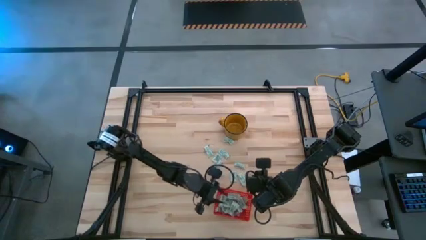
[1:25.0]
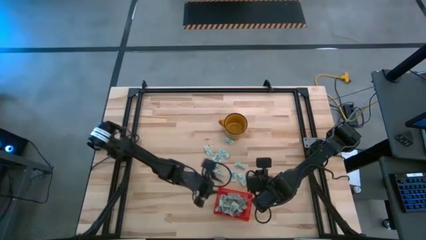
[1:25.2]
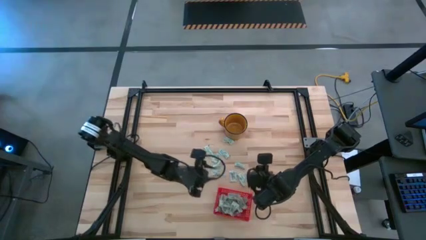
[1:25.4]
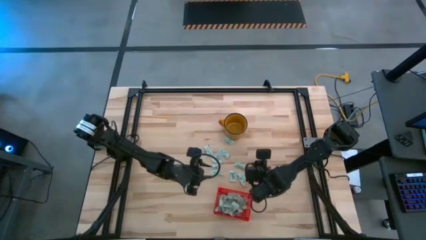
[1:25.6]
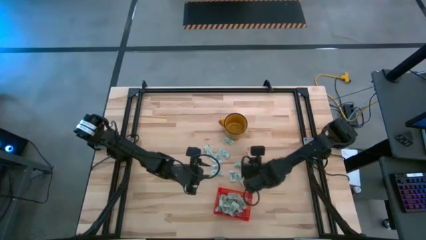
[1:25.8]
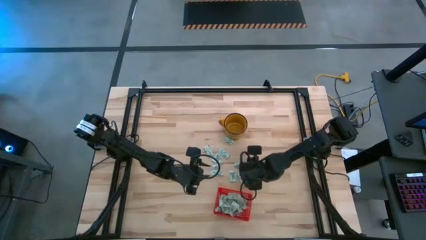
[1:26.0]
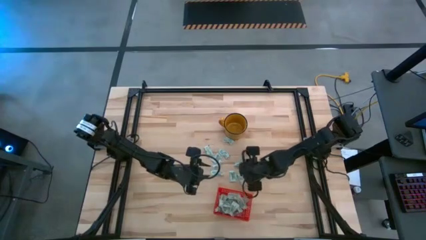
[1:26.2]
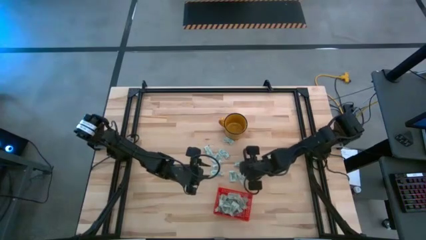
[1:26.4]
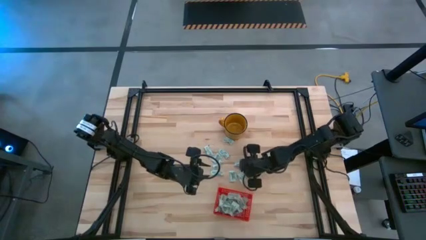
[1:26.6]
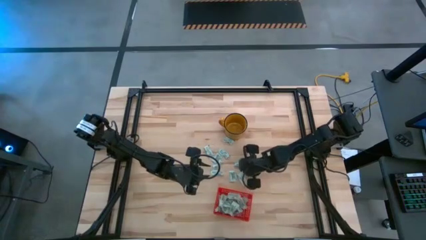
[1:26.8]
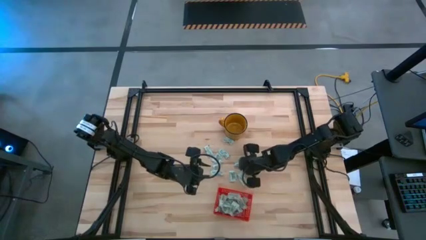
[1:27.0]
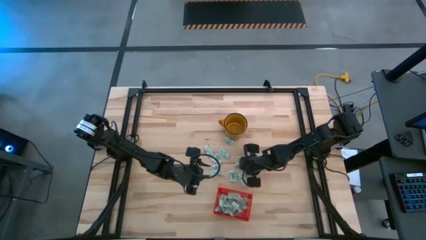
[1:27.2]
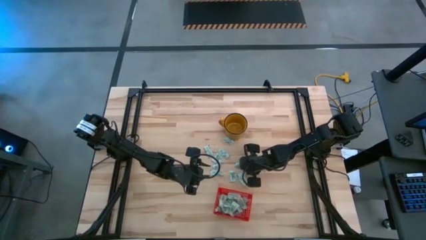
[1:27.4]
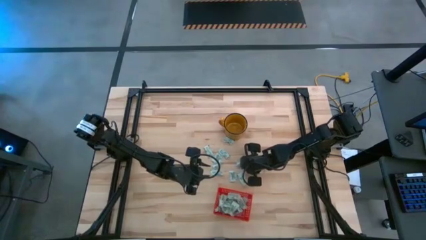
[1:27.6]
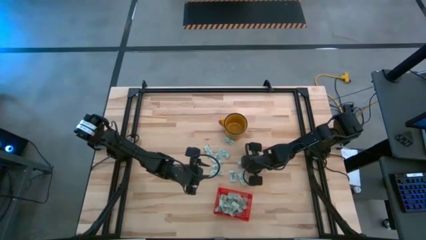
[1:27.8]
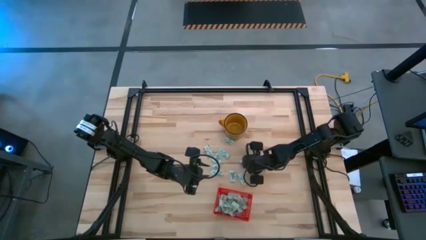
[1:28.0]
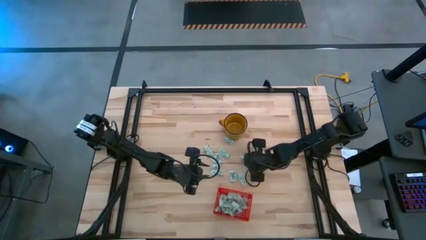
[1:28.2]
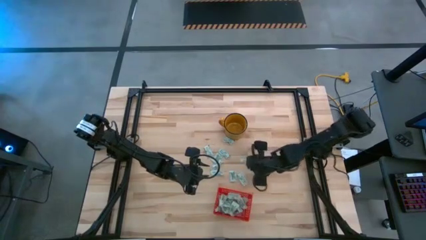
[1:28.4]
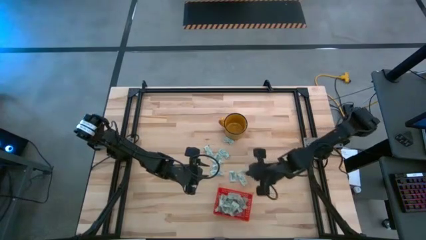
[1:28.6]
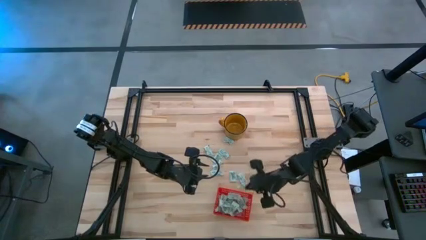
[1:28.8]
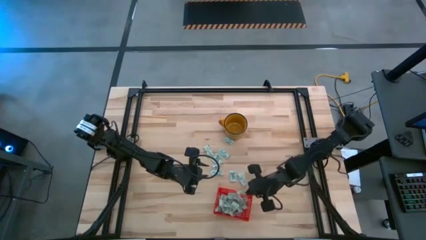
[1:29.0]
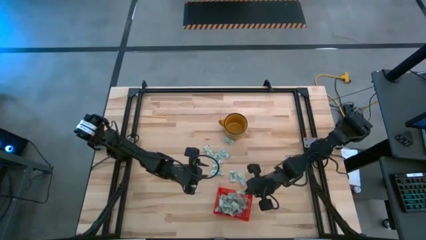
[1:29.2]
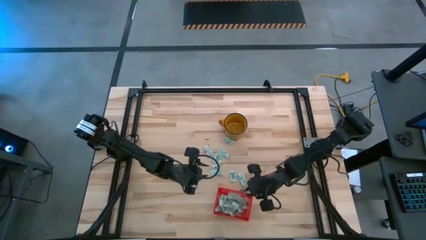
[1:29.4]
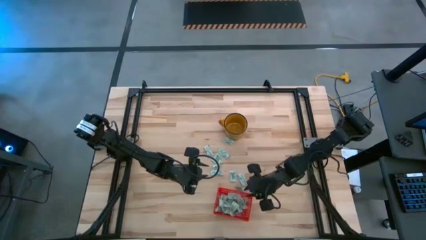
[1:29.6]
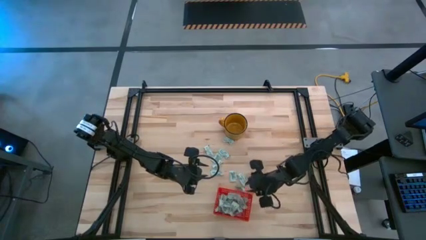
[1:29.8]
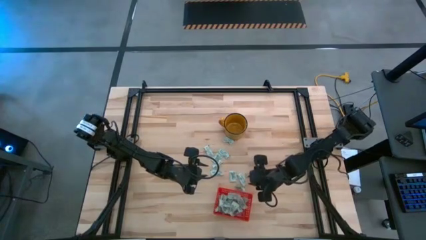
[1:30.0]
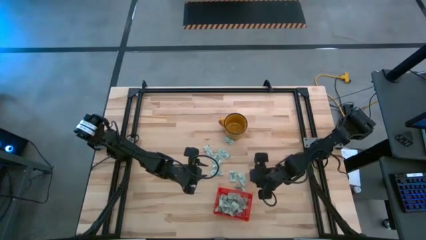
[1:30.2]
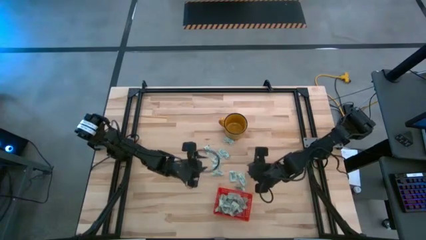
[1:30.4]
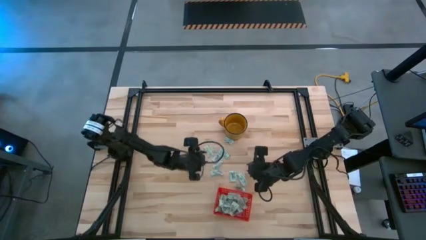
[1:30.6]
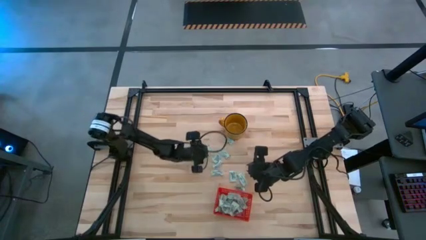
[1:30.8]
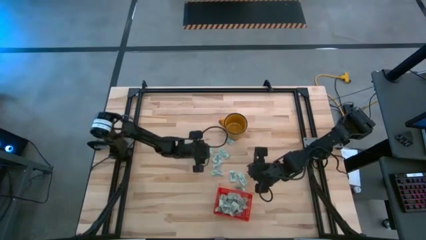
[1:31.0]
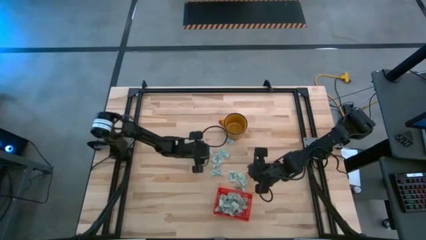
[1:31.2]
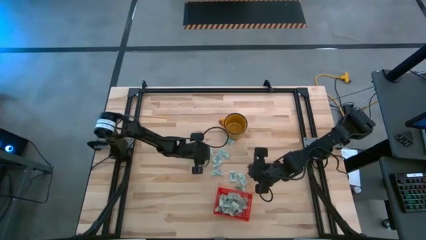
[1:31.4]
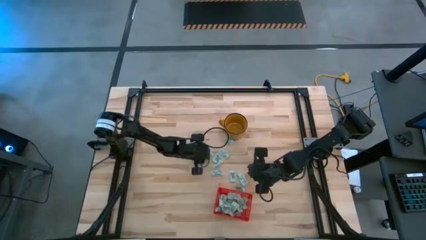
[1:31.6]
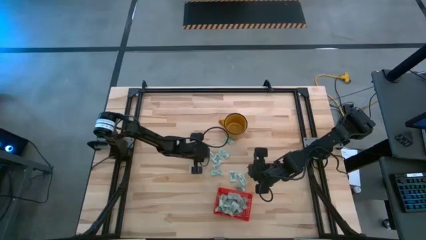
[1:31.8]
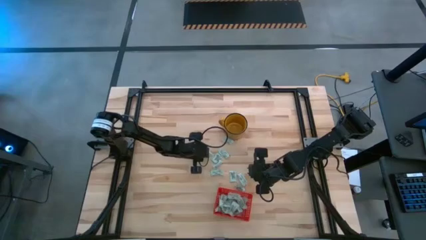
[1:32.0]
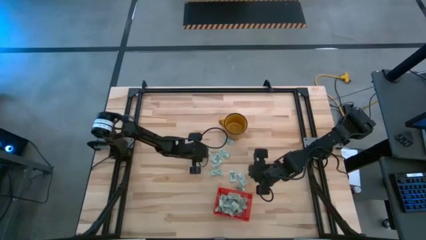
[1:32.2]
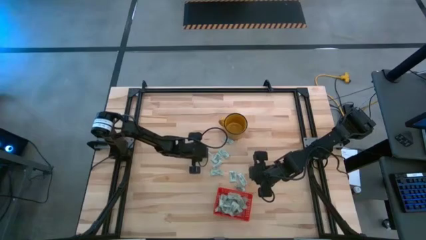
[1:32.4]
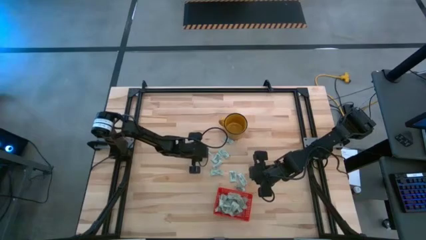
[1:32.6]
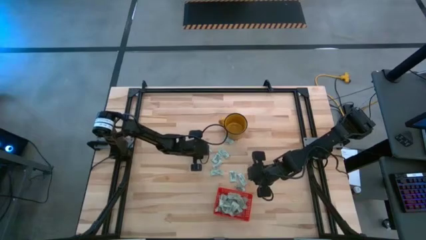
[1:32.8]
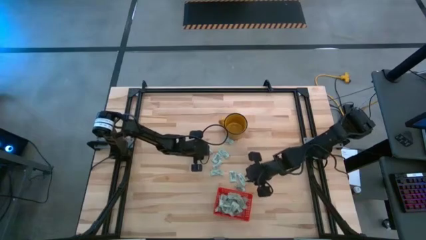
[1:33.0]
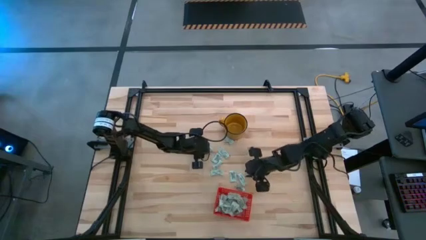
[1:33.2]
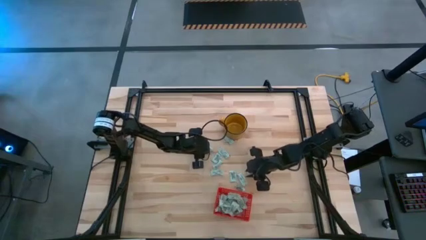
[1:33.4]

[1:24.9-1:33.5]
Task: Pick and place Stevia / Truvia into bins
Put the stevia packet into the bin

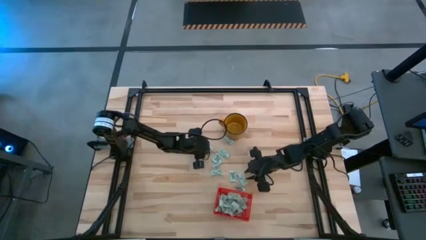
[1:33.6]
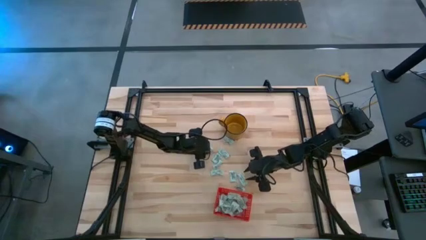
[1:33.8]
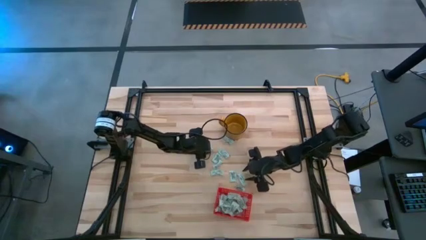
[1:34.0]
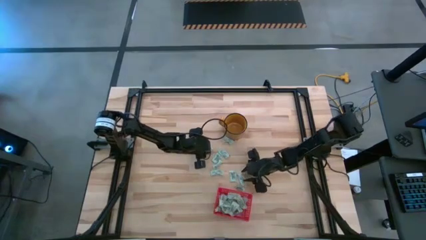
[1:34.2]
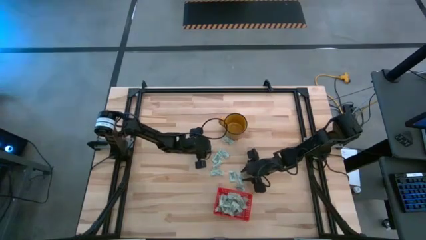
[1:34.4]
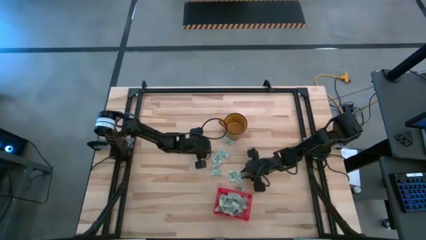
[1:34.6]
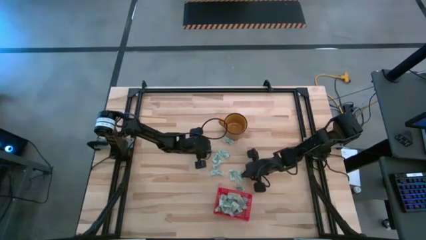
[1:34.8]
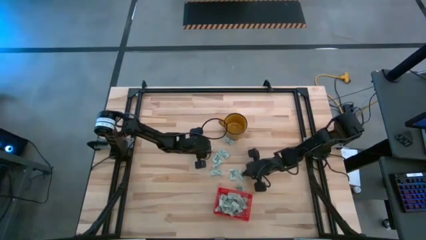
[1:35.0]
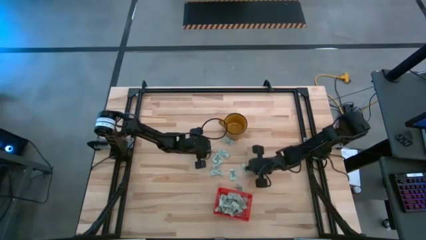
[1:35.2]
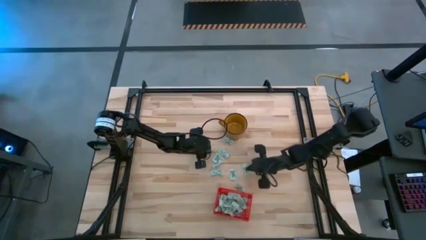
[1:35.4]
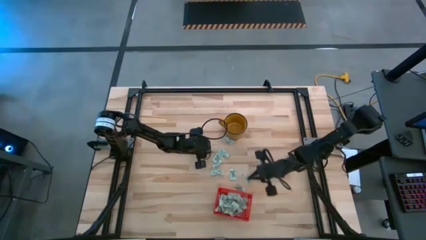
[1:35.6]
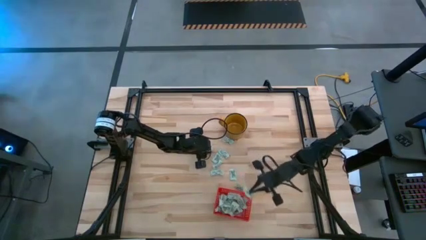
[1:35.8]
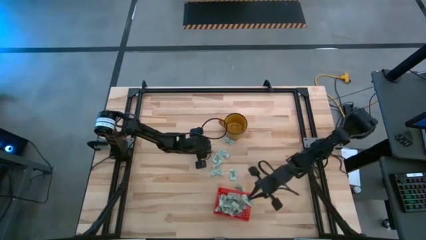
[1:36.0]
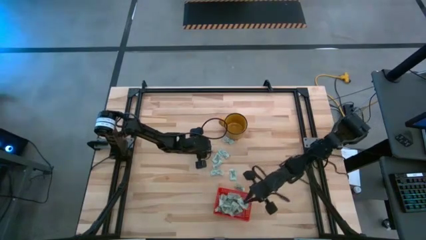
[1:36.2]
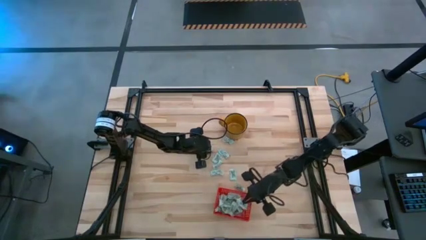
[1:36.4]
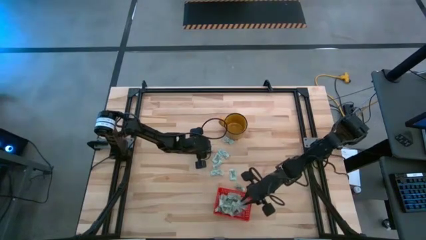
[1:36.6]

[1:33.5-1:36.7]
Put the stevia packet into the bin

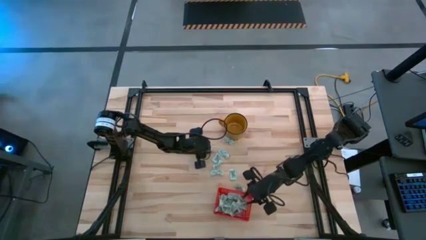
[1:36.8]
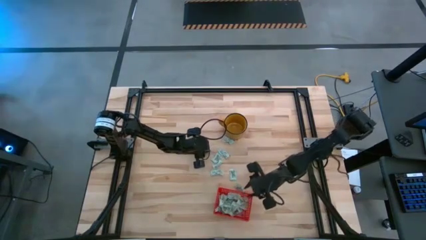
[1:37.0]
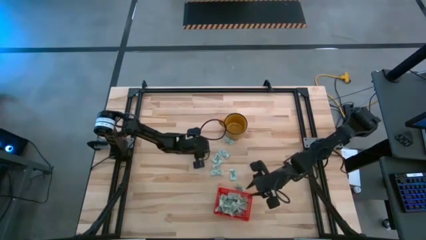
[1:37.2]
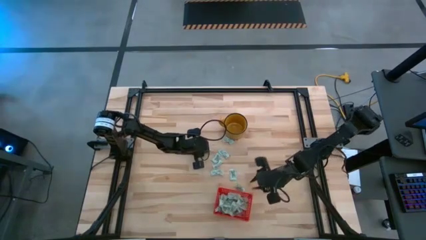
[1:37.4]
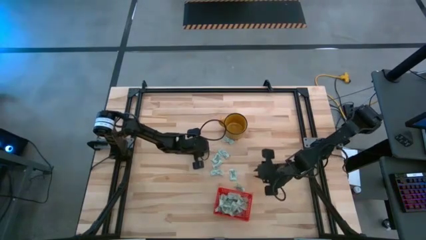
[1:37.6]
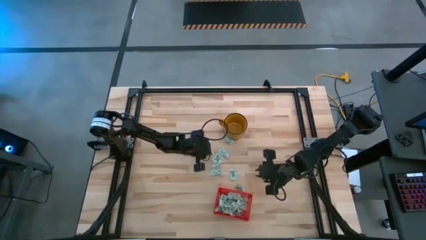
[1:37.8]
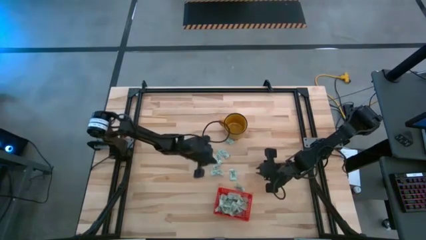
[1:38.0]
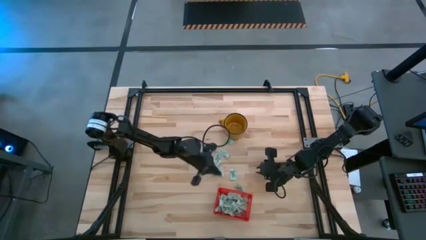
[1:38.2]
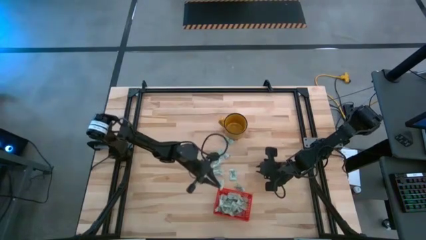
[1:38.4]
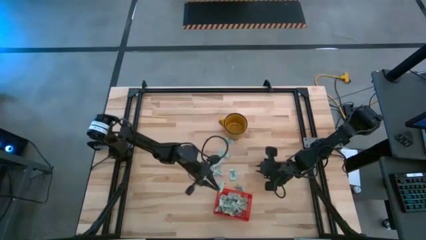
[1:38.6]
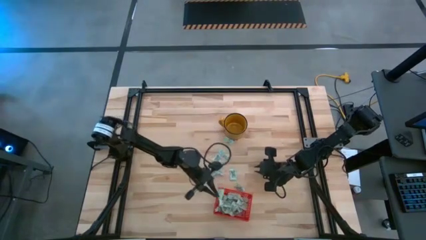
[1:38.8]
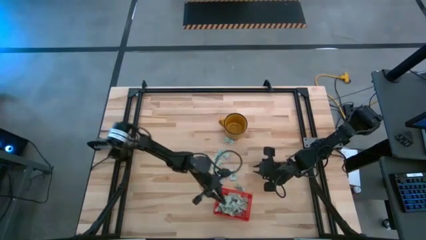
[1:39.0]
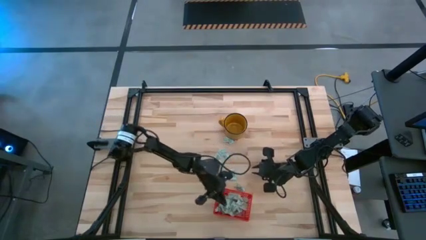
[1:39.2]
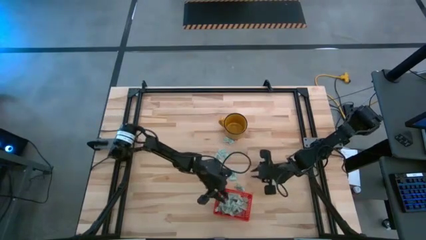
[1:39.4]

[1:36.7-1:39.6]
Put the stevia packet into the bin

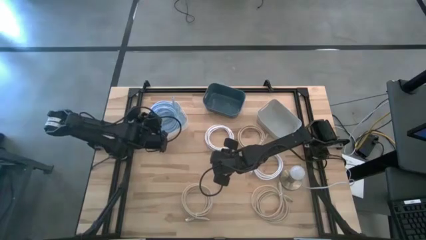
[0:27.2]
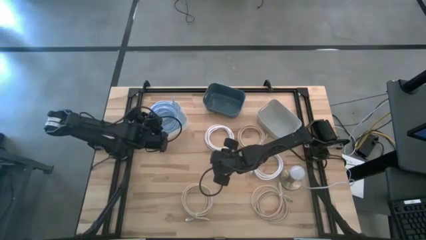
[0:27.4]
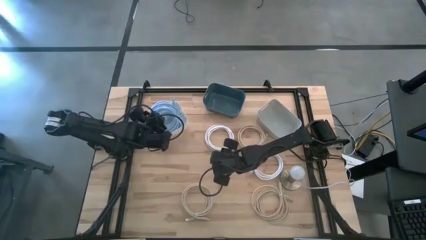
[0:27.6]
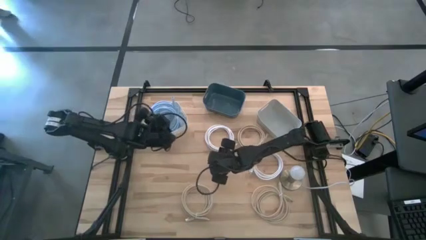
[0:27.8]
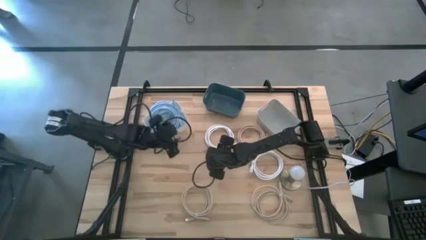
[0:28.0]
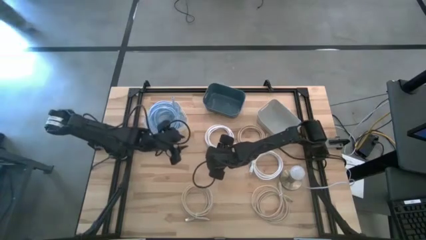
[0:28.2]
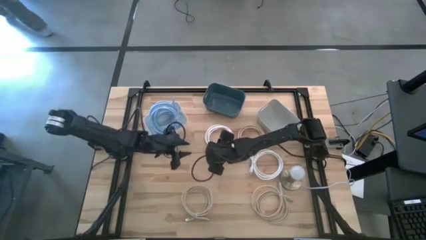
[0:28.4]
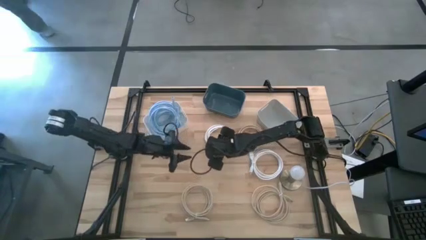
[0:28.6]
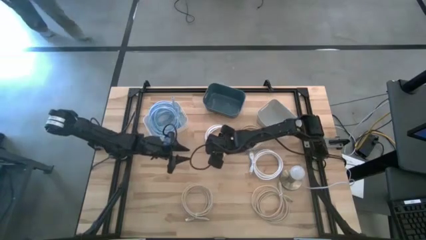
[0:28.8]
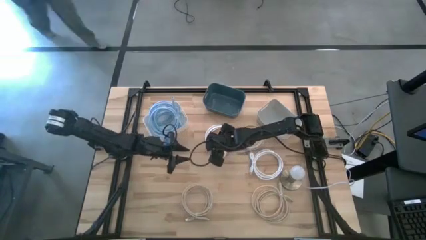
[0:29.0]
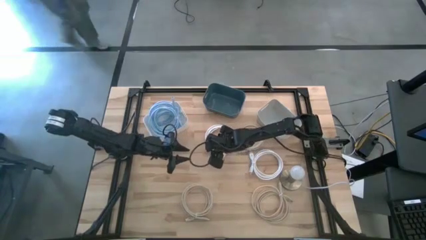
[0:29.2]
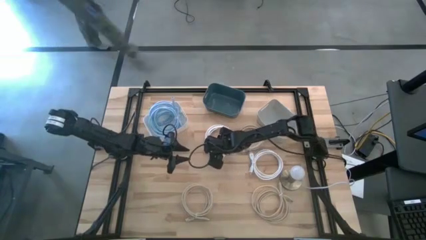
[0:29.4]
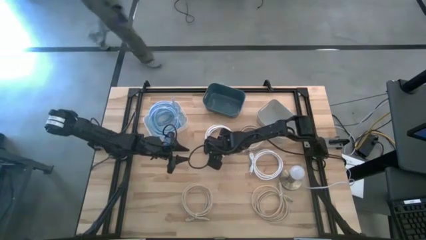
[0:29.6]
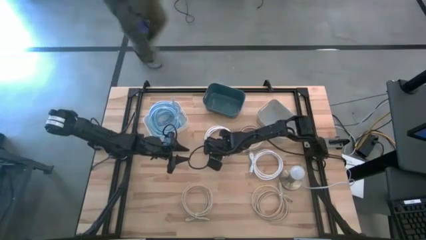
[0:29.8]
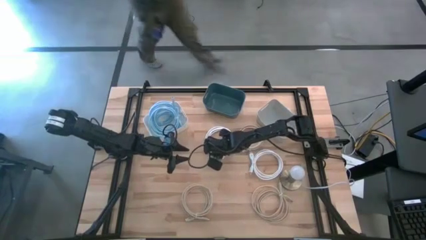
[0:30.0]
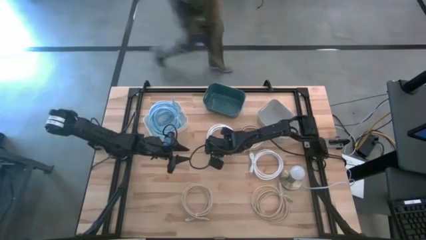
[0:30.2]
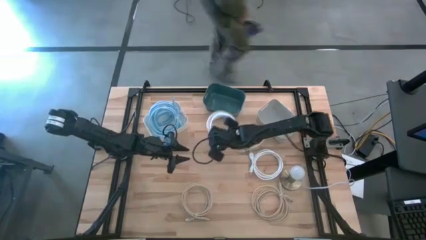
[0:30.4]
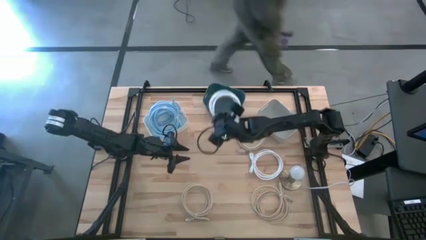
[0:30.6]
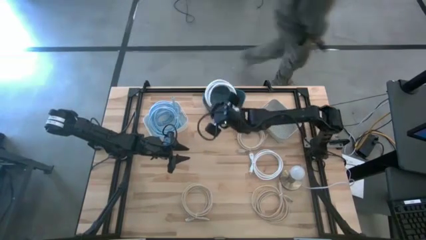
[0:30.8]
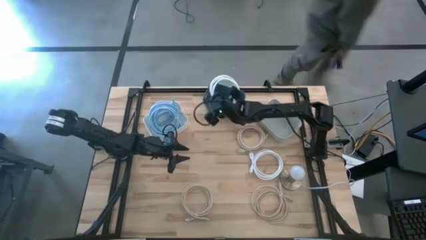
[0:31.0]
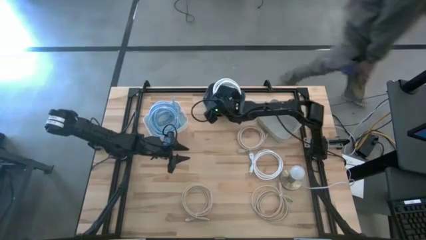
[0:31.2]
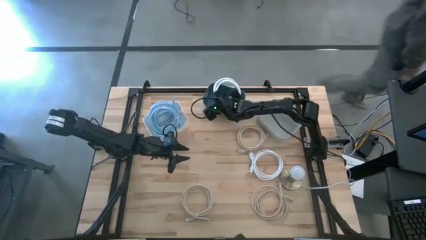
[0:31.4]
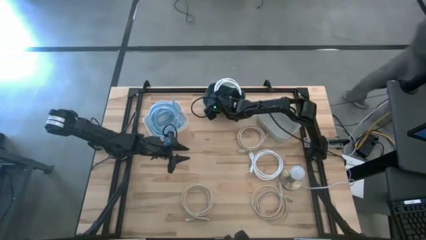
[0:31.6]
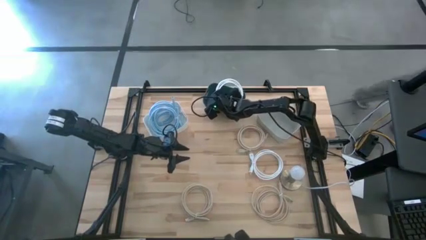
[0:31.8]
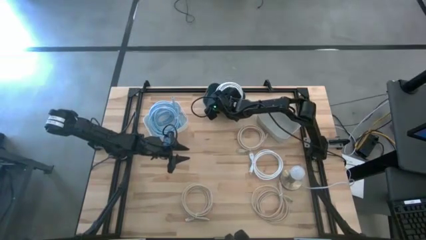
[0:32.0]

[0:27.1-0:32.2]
Task: Pick & Place USB Port
Put the top white usb cable into the dark green bin
